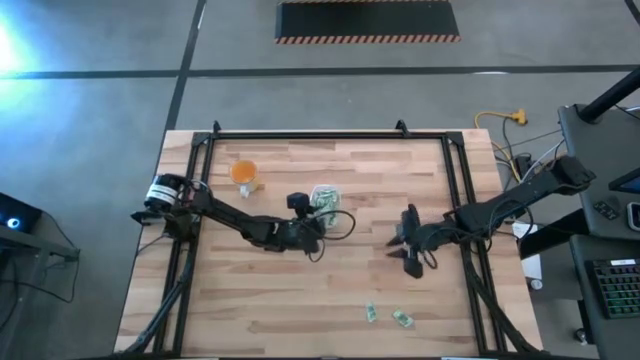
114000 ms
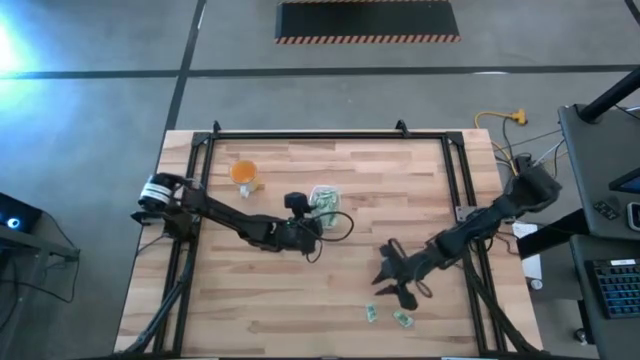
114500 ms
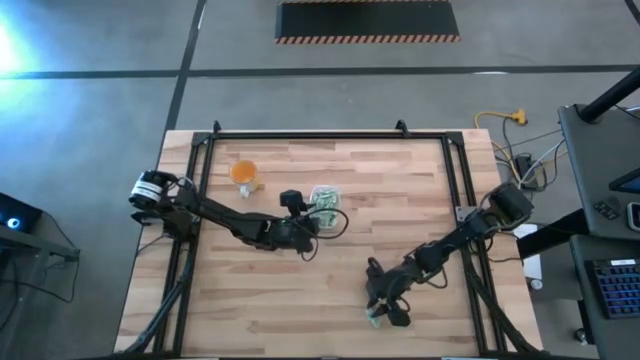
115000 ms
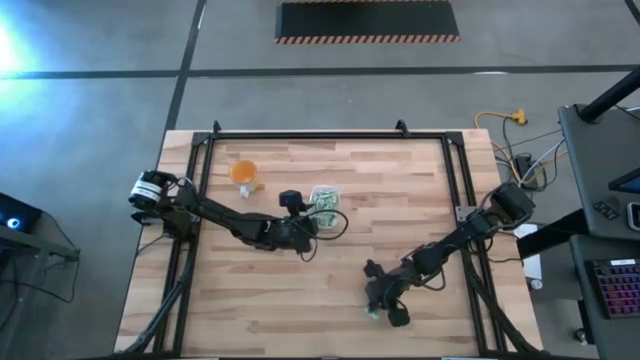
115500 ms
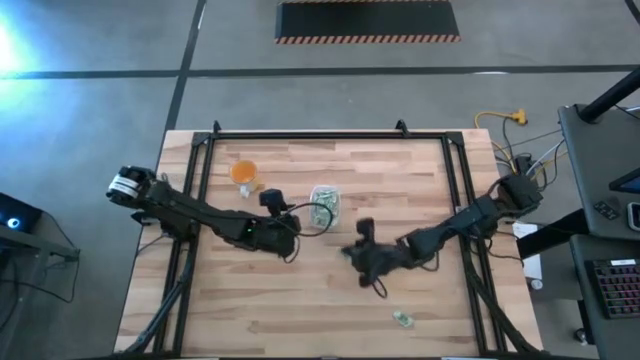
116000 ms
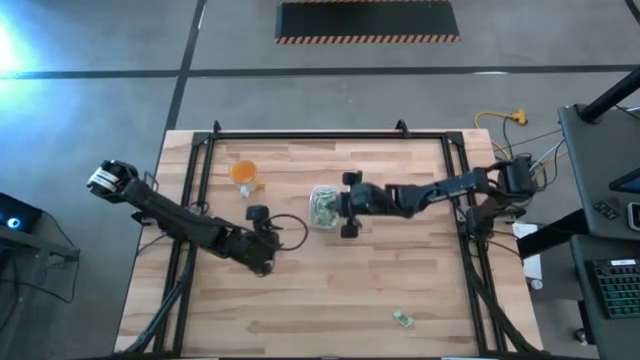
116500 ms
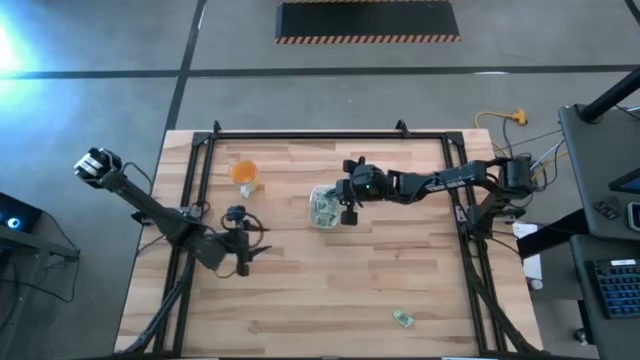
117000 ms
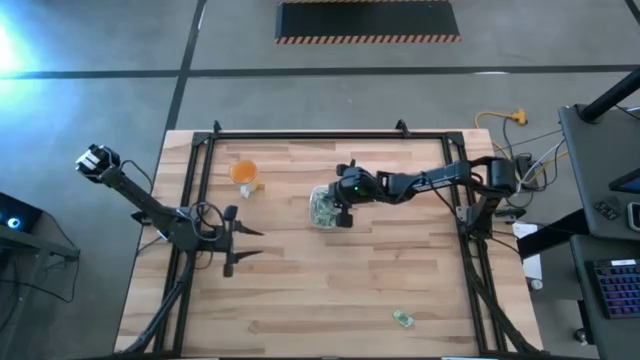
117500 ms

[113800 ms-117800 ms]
Task: Pick and place Stevia / Truvia into bins
Put the left stevia packet into the bin

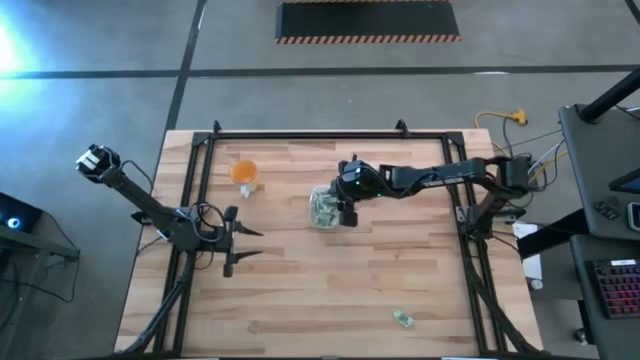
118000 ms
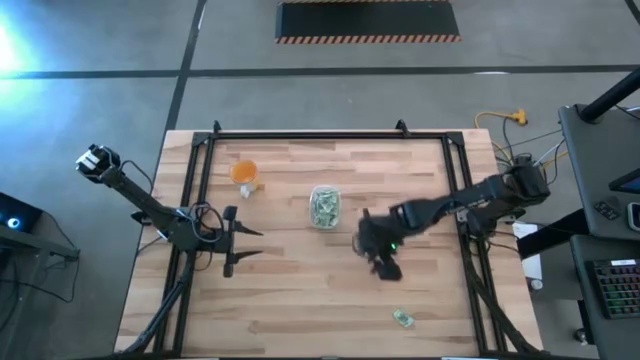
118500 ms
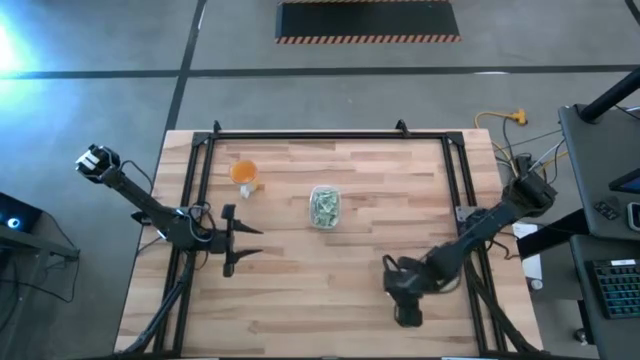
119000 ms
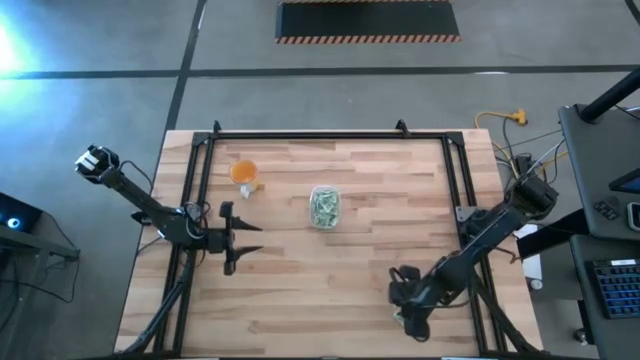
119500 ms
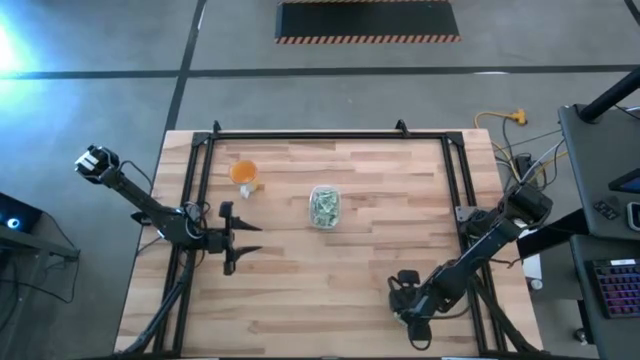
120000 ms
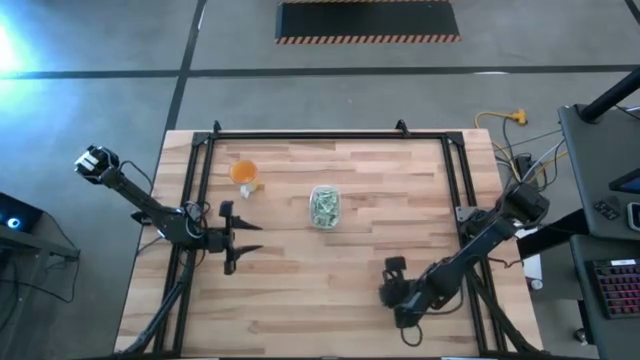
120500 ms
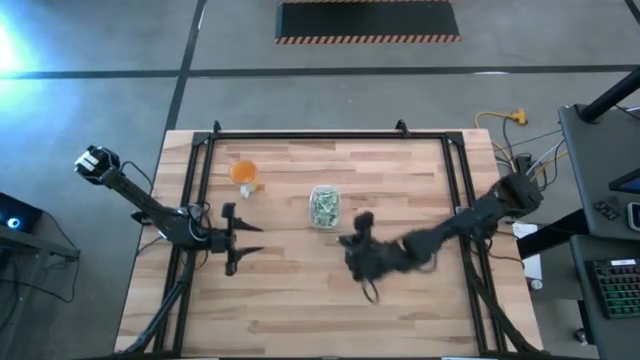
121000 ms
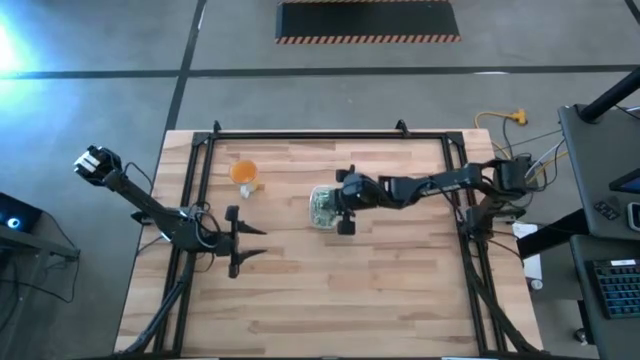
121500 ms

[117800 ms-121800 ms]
Put the stevia packet into the bin

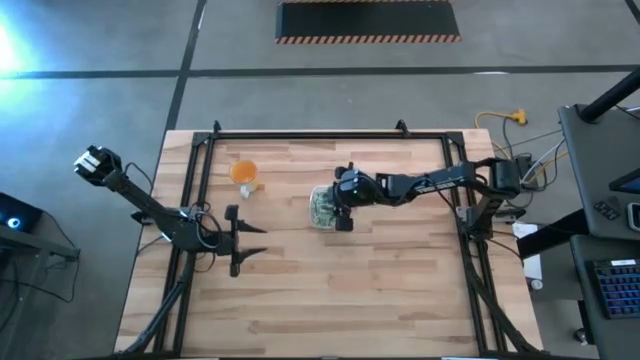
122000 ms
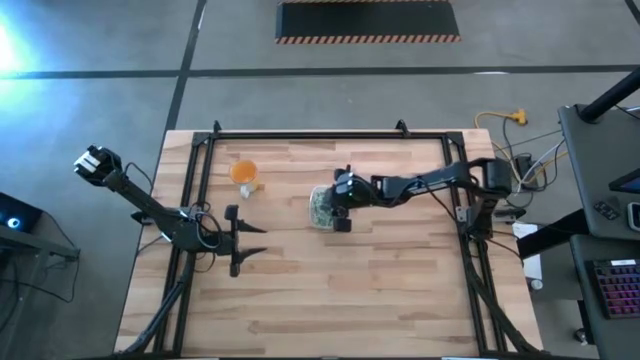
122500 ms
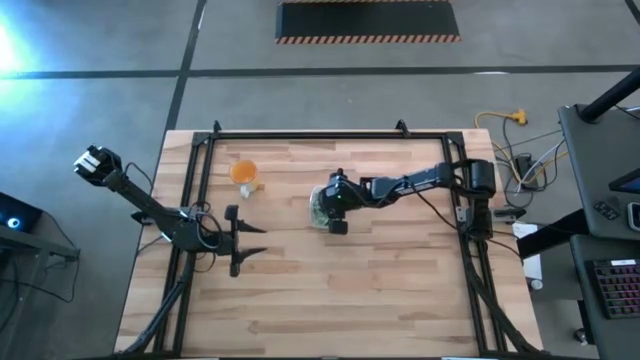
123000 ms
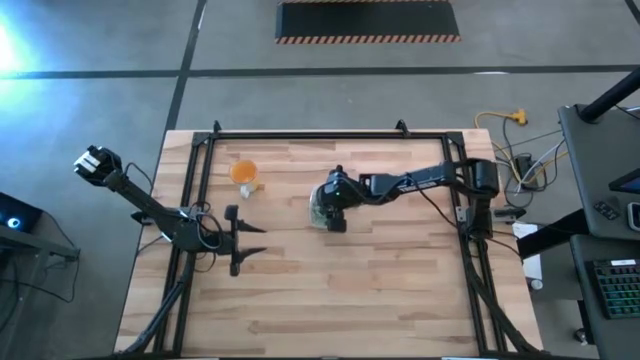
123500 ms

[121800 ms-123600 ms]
Adjust the stevia packets in the bin

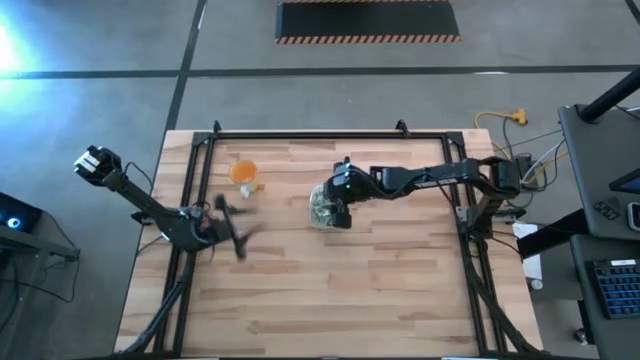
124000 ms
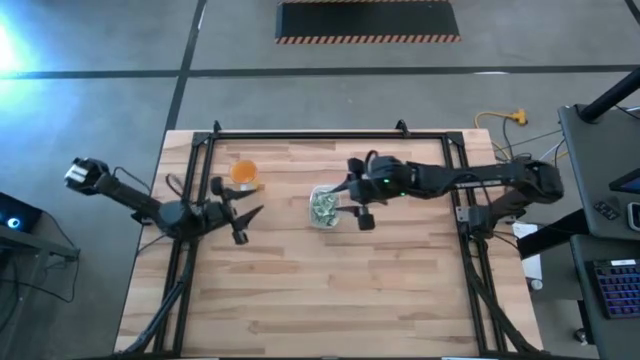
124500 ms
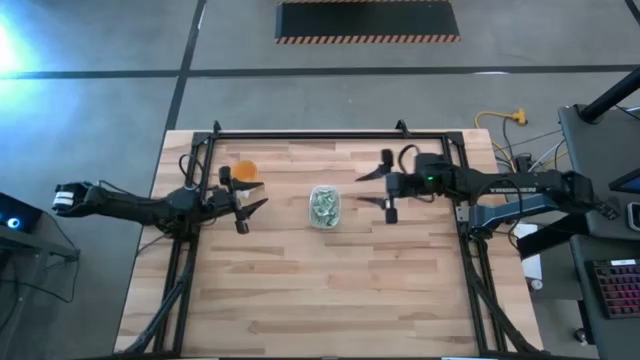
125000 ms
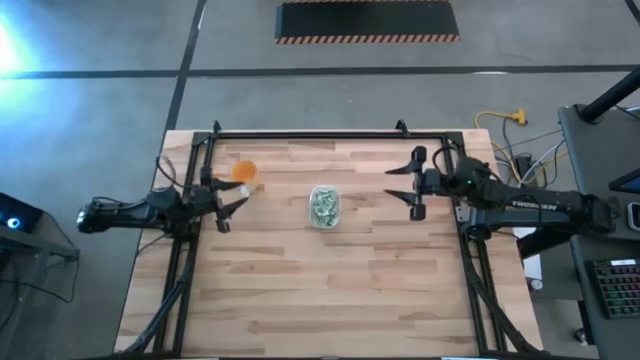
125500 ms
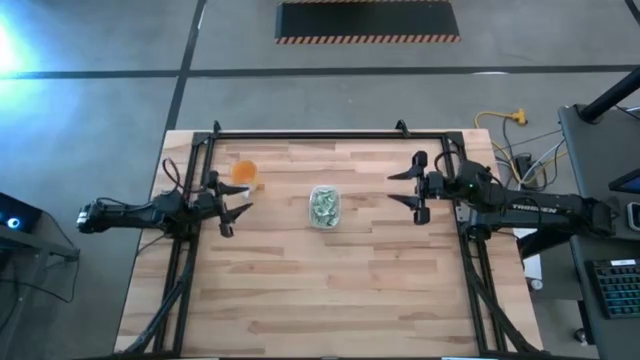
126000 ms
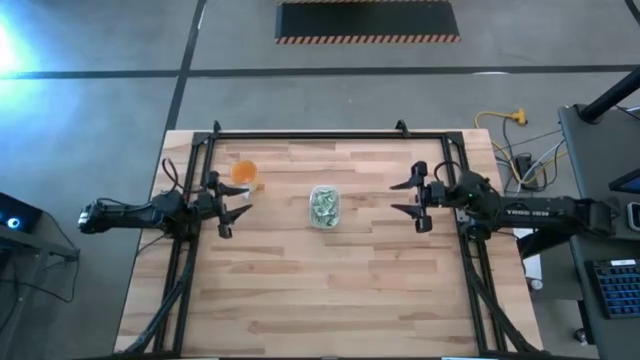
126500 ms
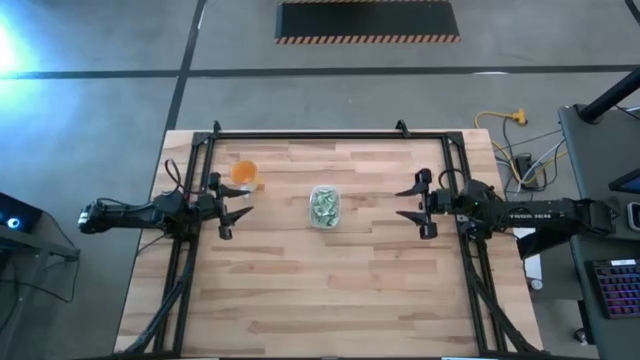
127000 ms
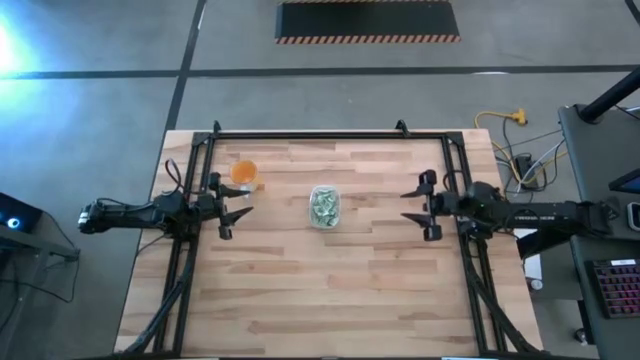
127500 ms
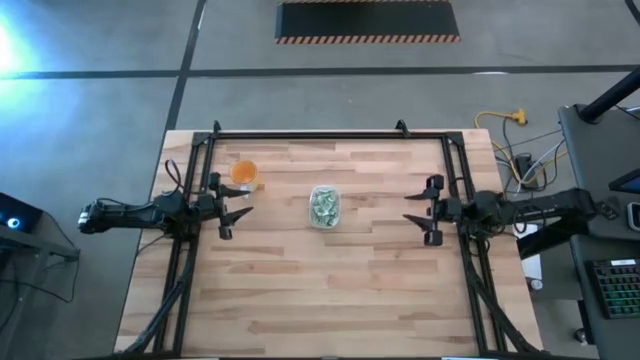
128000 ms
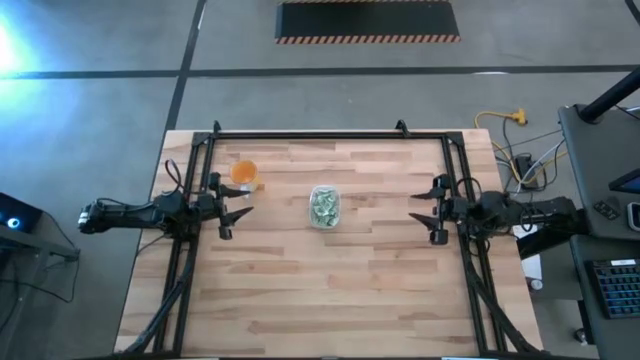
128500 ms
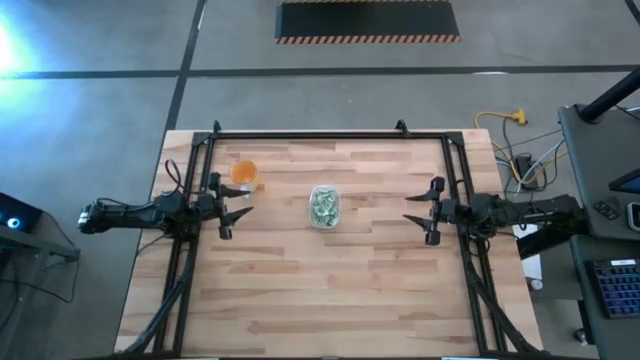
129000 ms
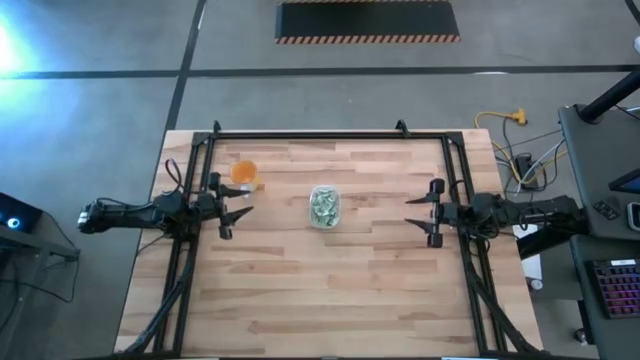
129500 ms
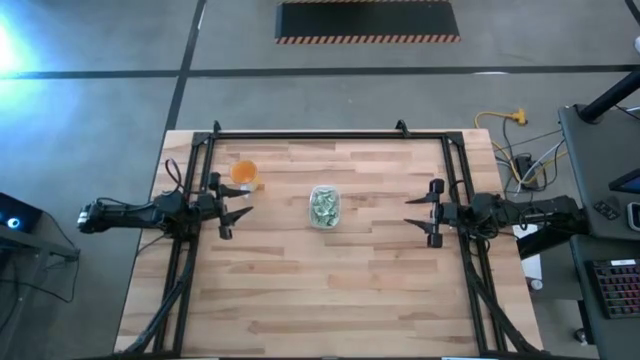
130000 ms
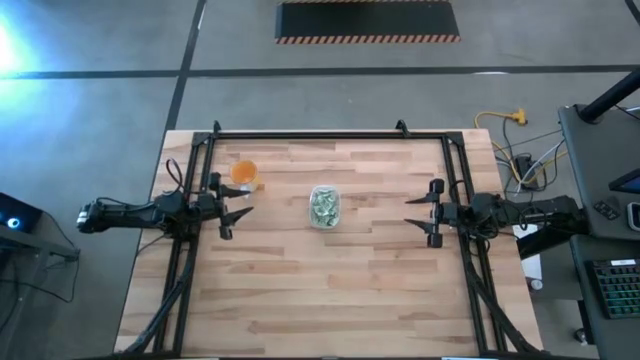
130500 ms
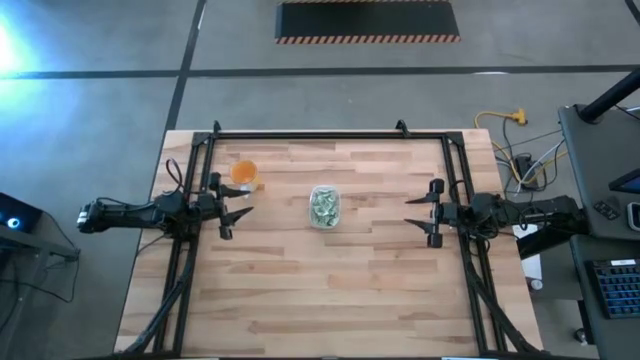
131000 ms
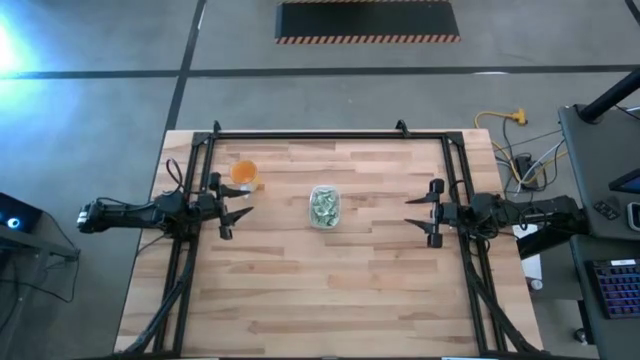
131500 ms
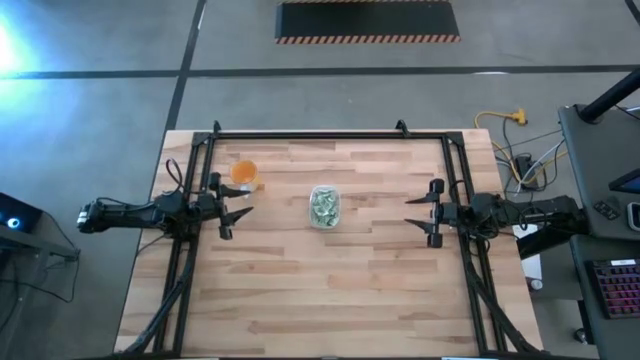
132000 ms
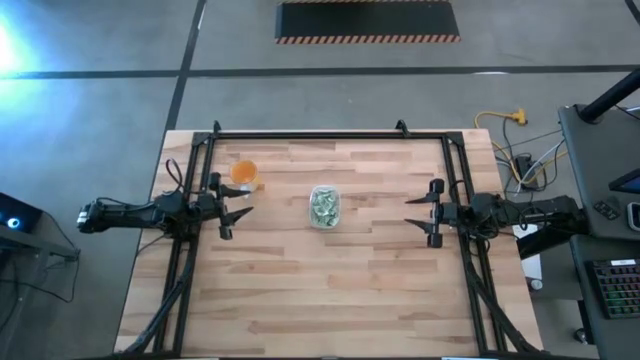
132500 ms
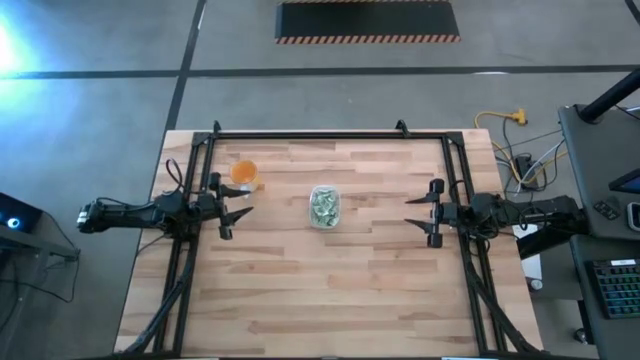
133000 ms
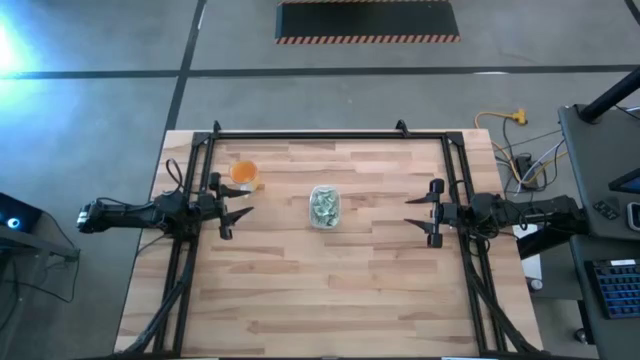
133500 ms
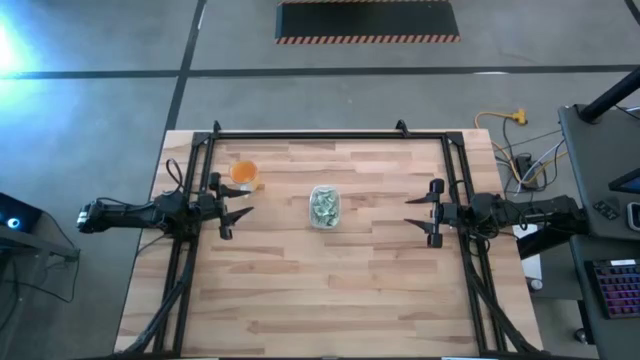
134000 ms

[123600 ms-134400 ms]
Return to Home Position
